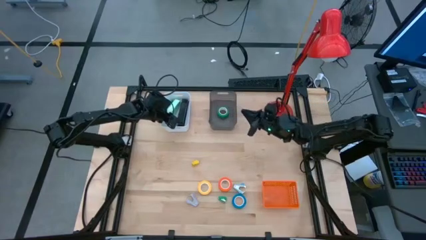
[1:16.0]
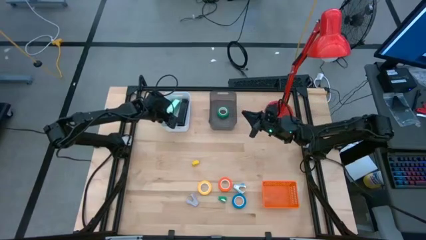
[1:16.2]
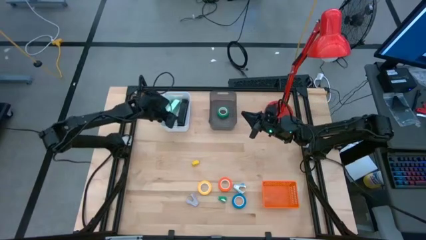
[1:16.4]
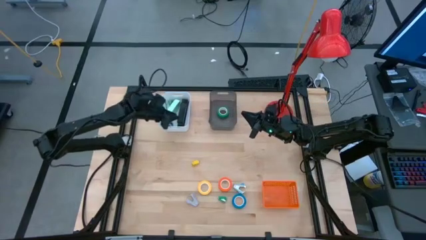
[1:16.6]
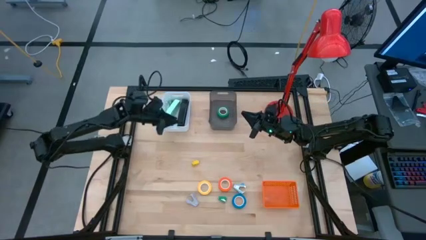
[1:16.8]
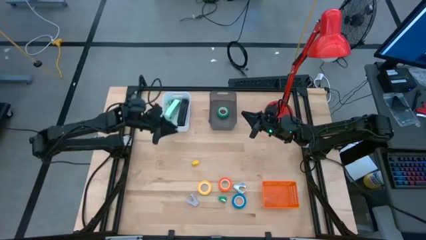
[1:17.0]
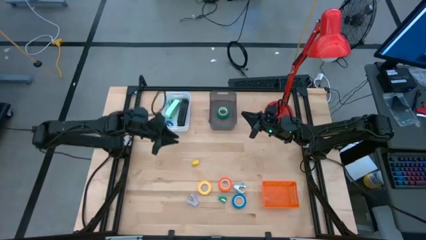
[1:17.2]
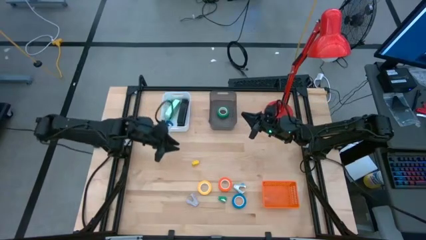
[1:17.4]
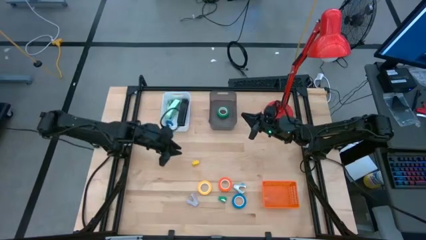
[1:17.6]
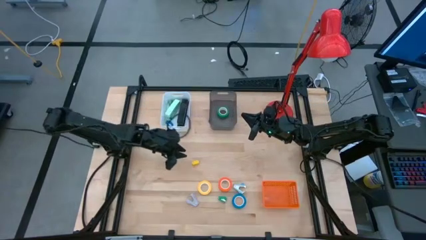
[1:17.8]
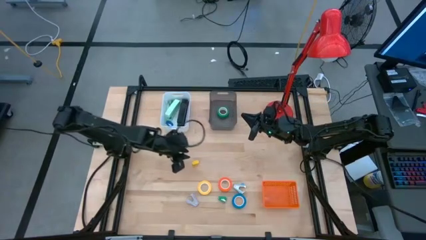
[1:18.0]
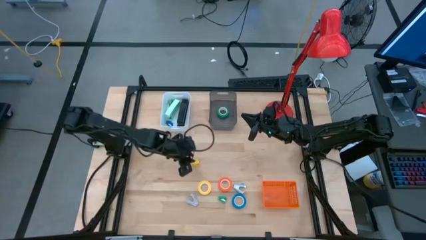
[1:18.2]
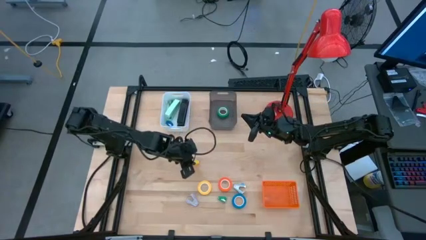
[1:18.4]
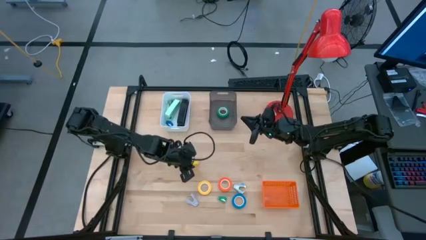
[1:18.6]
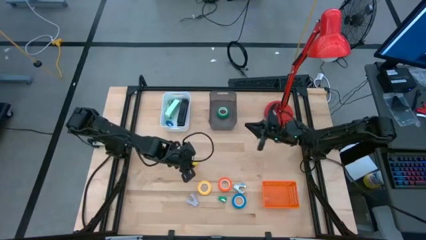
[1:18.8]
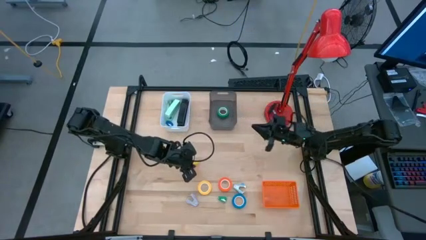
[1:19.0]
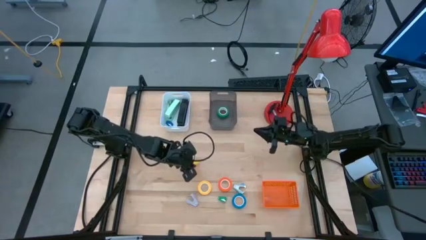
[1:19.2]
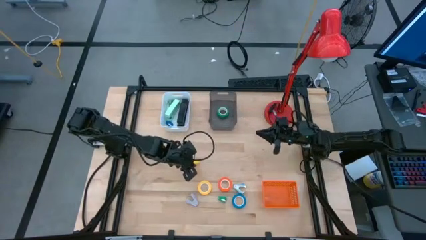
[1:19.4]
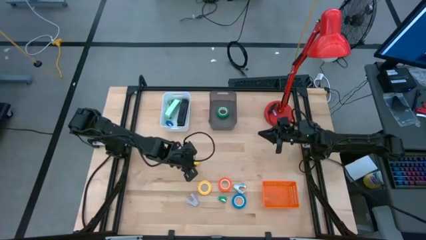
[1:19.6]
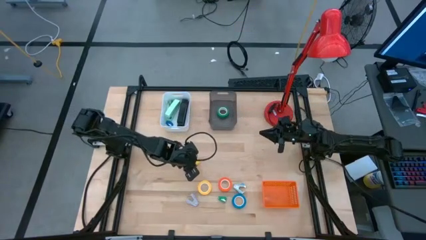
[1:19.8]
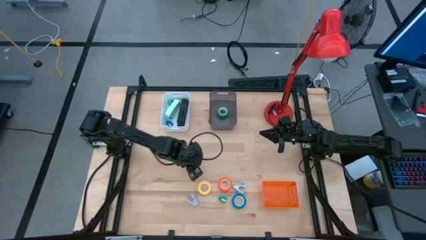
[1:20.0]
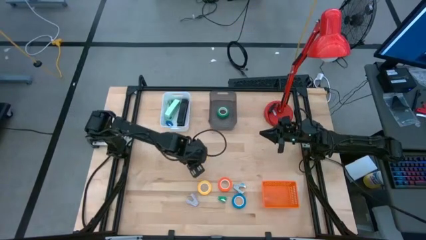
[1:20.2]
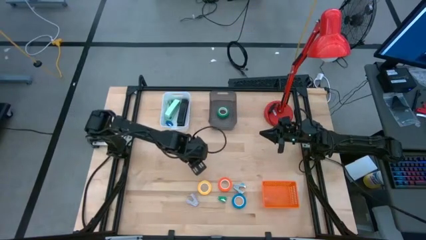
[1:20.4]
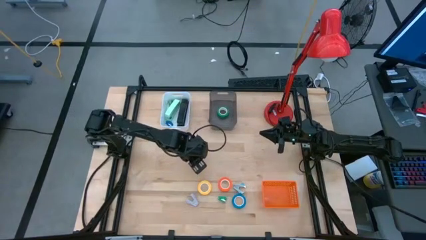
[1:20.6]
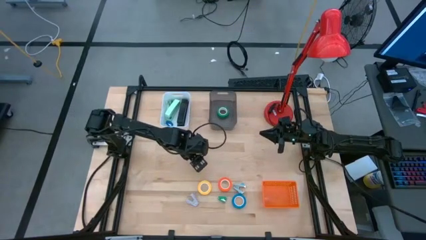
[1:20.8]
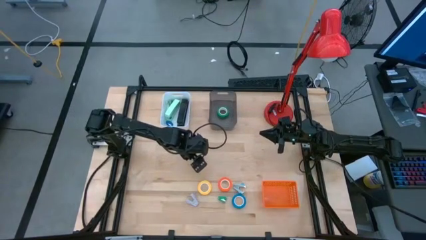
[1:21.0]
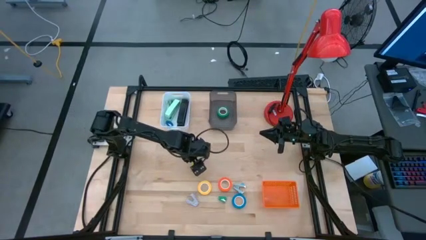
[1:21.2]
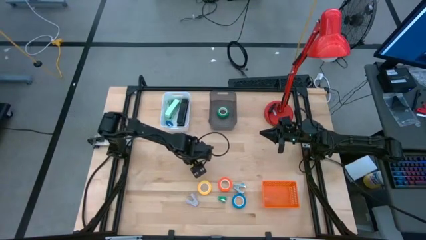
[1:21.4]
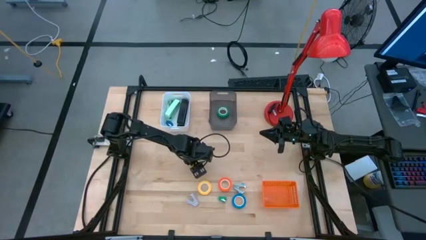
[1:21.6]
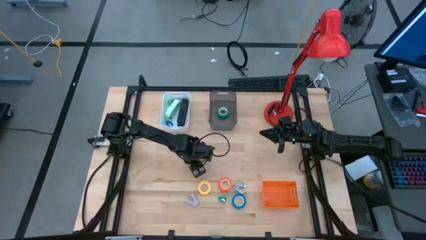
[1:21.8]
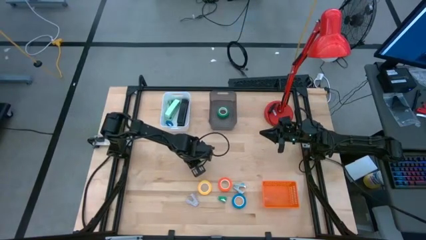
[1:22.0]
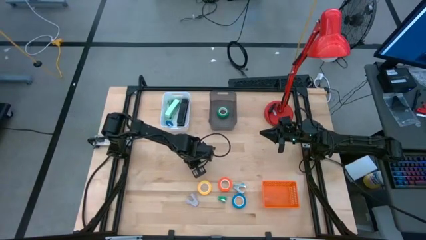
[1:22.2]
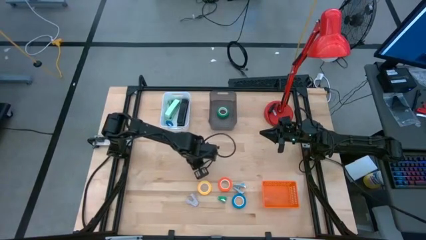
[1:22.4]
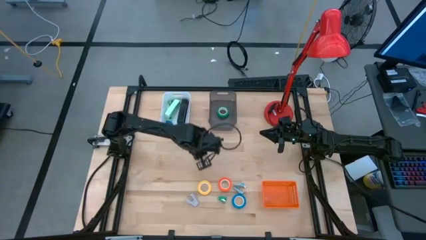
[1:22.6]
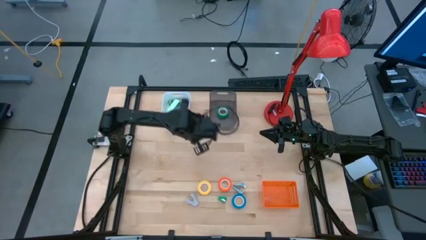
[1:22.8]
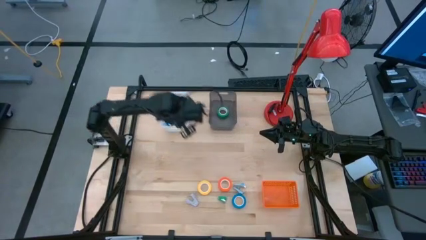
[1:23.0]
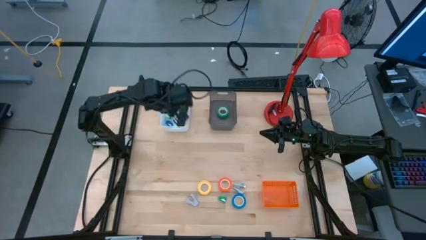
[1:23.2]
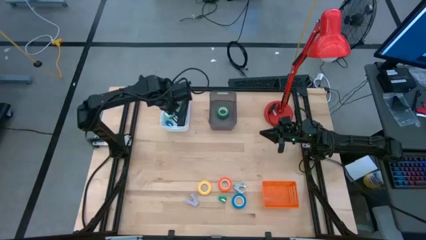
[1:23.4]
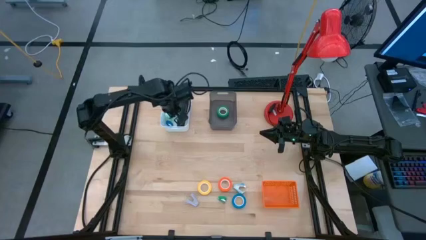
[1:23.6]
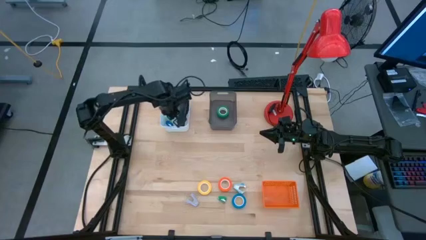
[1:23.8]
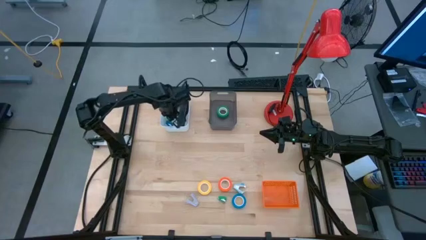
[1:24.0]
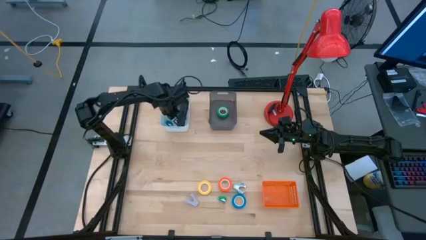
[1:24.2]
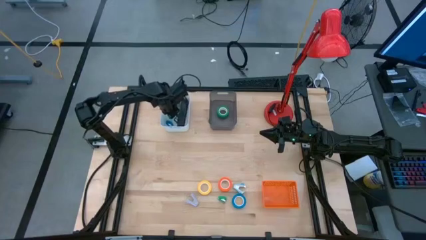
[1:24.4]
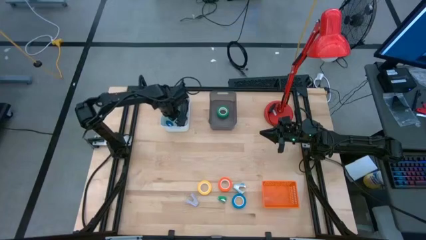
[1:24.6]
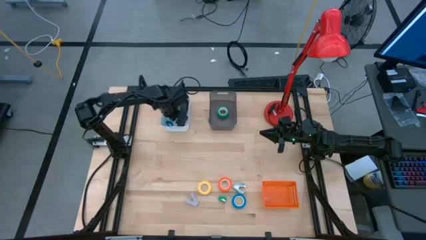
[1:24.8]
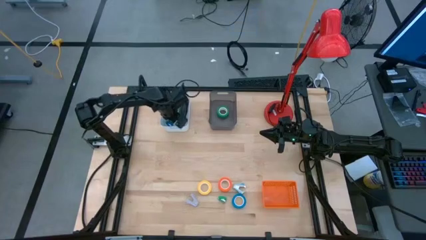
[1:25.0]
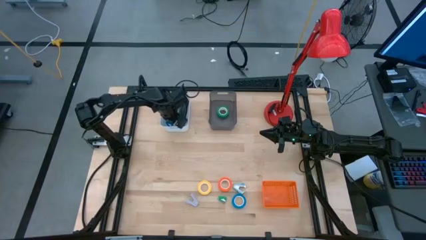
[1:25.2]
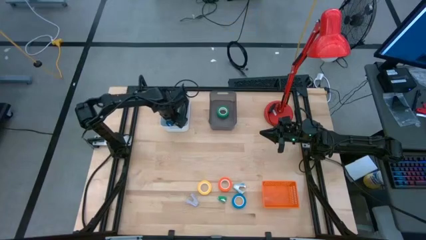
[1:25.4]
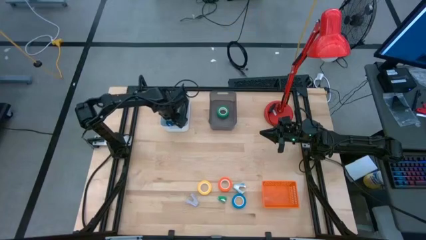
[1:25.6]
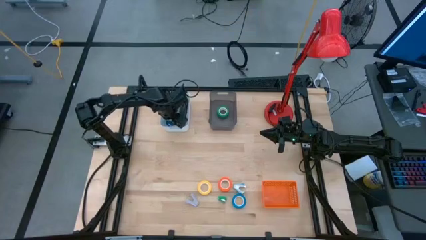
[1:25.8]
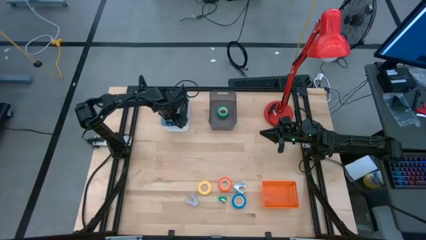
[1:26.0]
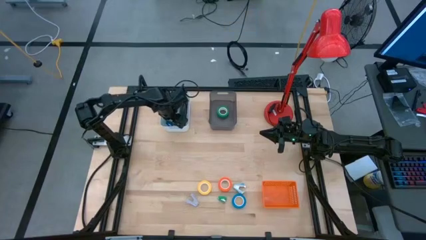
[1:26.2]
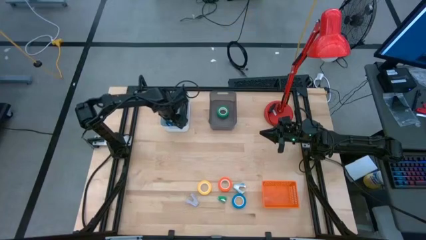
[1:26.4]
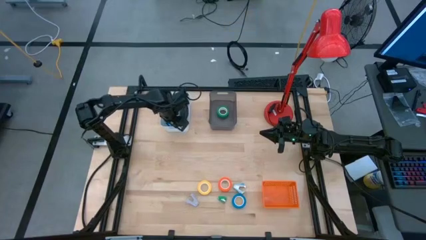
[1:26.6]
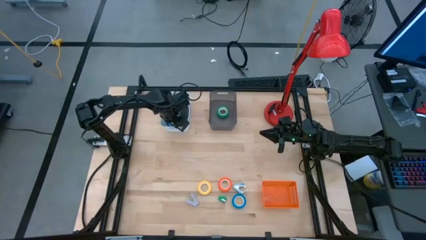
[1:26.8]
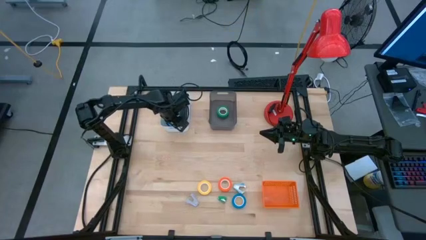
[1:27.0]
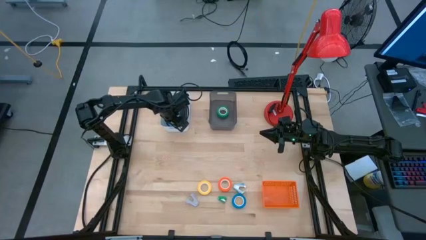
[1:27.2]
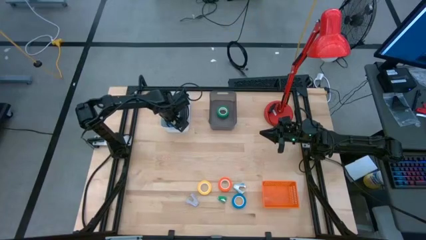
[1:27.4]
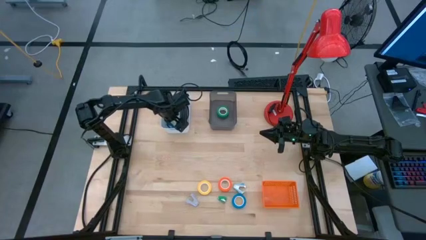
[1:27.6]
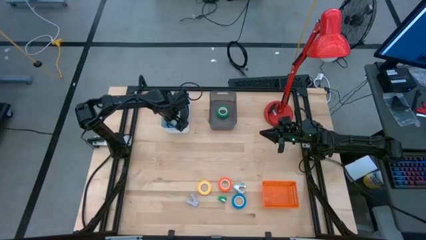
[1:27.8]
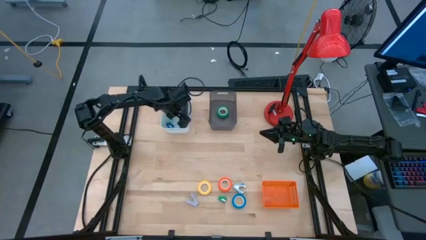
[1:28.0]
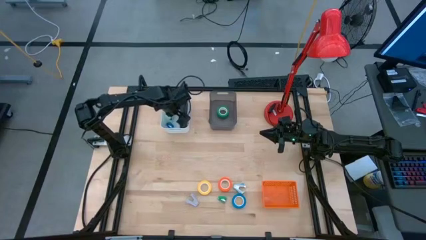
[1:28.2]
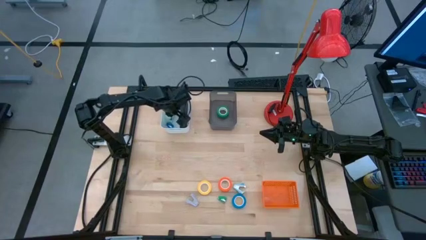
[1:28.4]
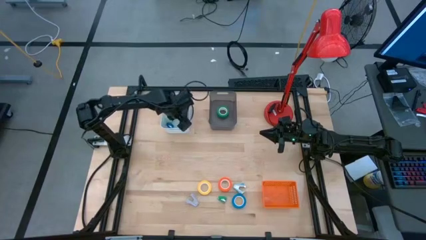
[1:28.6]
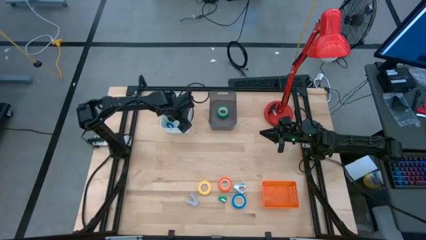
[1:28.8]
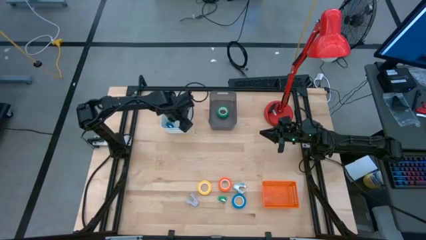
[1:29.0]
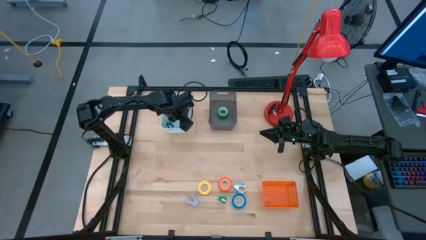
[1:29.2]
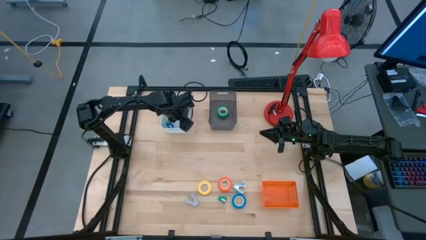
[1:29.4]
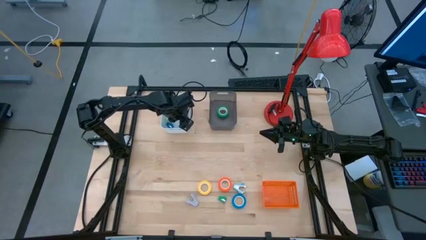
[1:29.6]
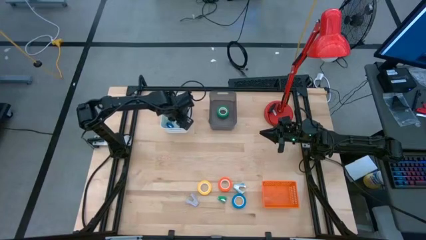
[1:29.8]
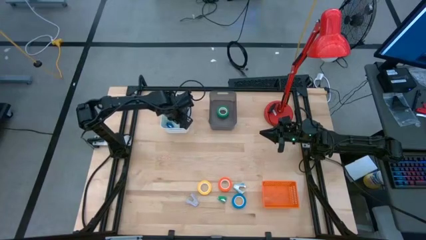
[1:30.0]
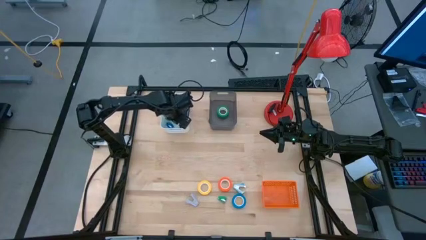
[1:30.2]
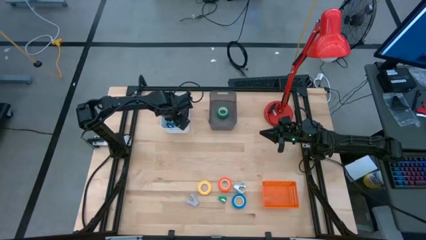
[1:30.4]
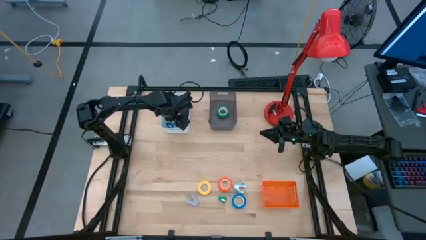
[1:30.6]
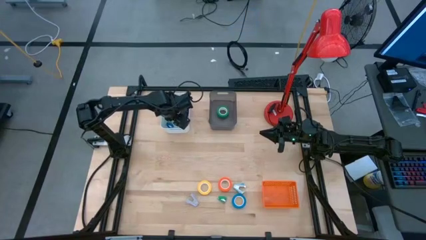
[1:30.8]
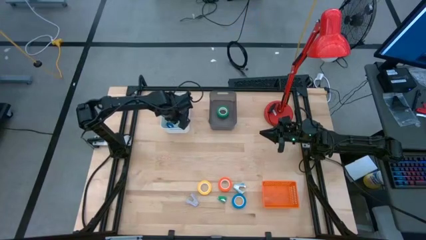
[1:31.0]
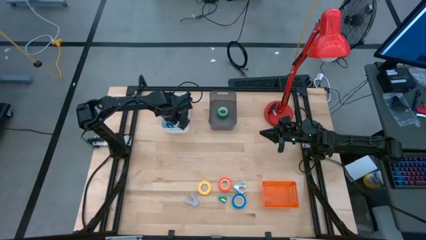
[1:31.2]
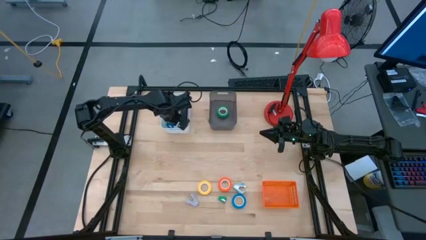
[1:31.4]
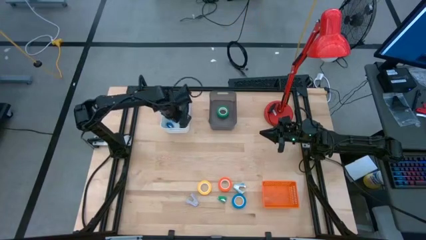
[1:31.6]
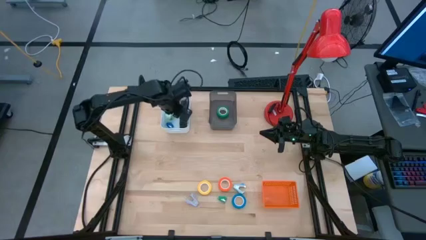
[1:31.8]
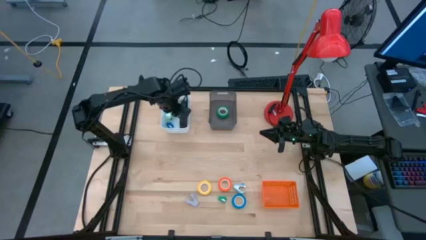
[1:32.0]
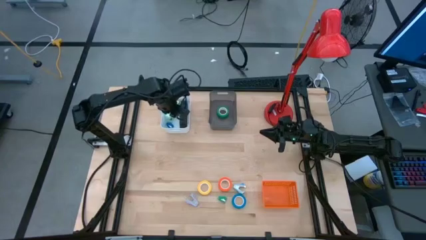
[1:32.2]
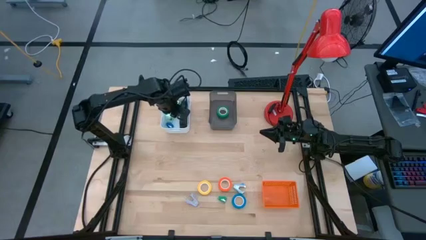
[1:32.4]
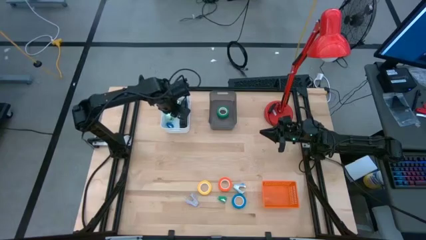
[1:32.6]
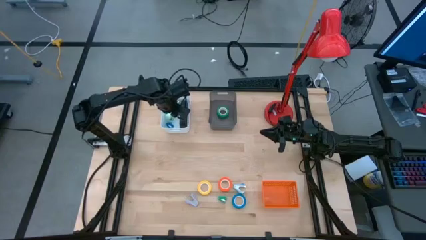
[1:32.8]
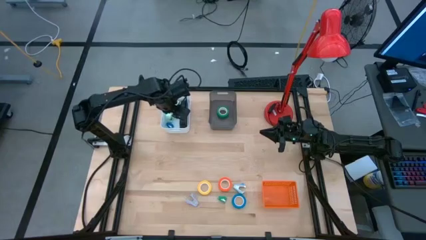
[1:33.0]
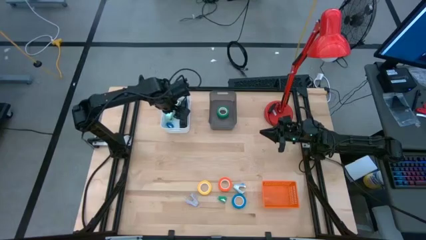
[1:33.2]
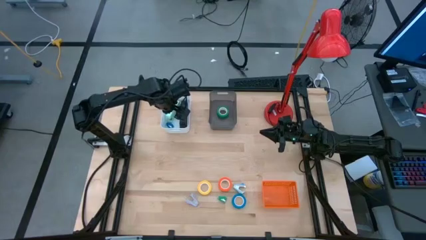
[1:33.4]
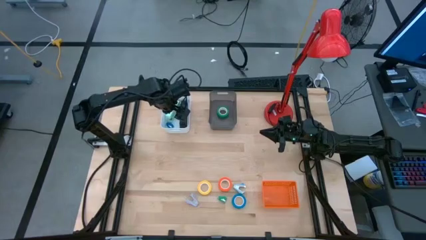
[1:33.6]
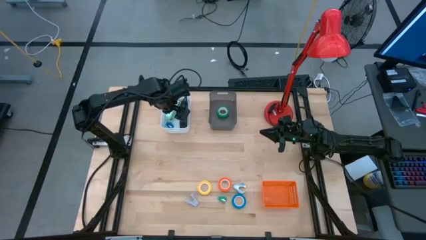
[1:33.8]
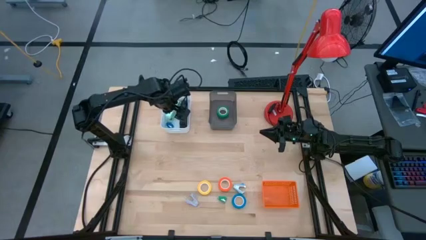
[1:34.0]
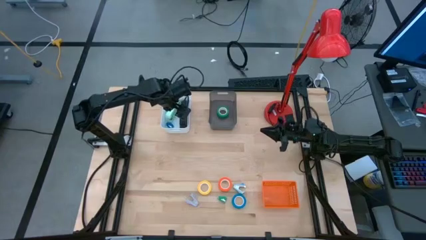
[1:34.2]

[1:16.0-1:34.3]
Task: Pick and place Stapler, Stapler remover, tape
Put the small yellow stapler into the white bin
